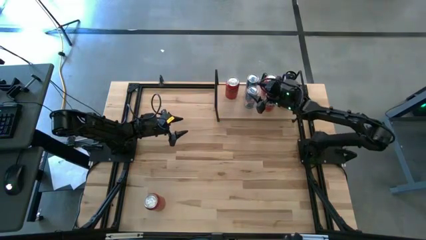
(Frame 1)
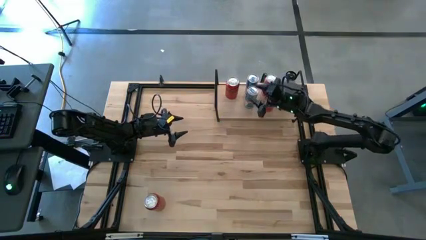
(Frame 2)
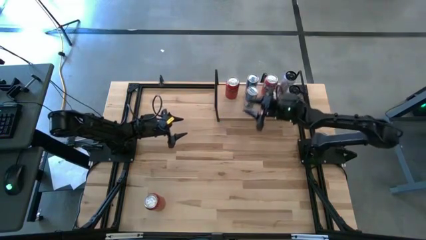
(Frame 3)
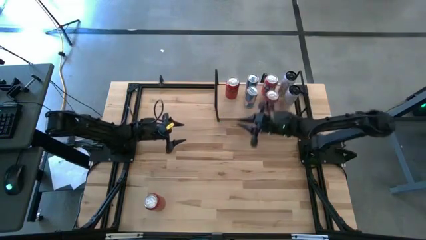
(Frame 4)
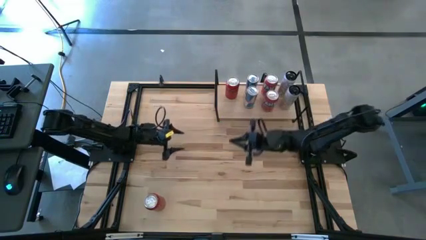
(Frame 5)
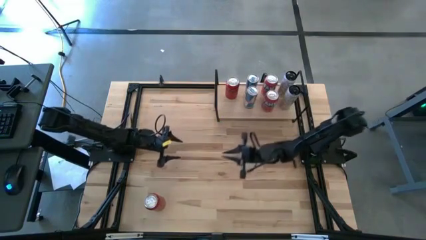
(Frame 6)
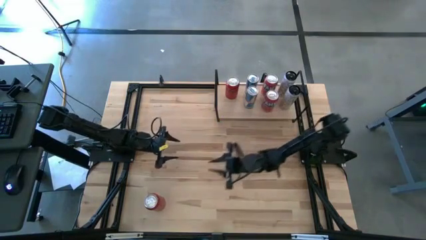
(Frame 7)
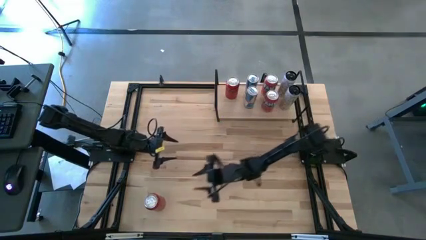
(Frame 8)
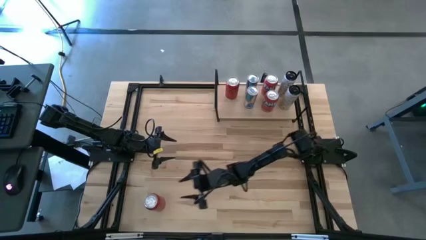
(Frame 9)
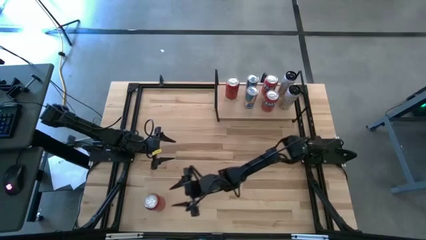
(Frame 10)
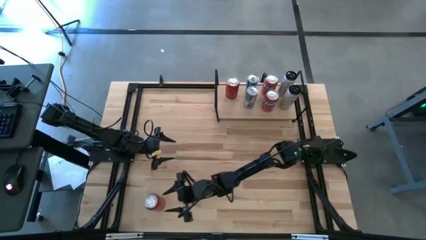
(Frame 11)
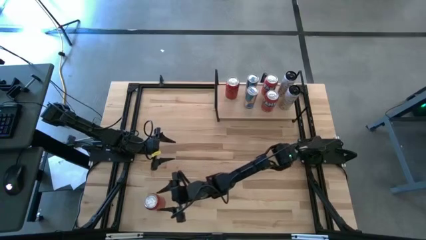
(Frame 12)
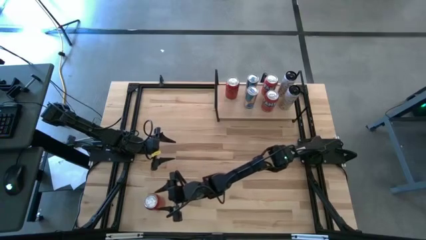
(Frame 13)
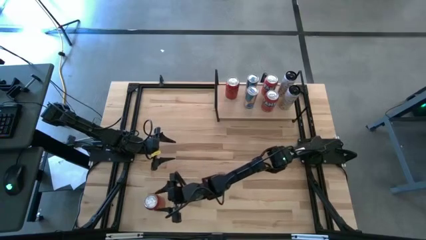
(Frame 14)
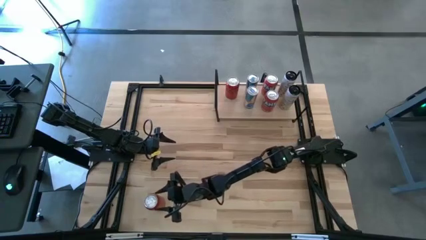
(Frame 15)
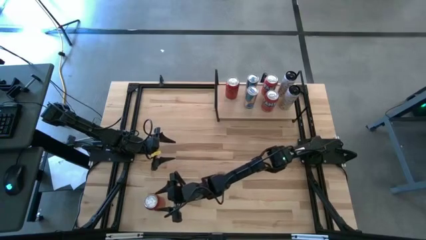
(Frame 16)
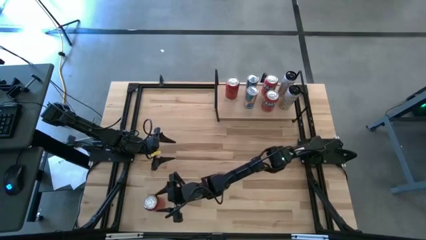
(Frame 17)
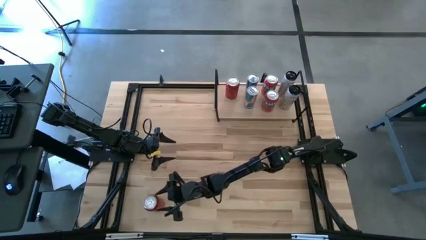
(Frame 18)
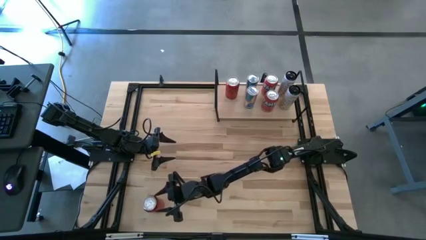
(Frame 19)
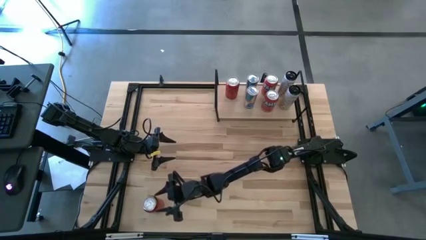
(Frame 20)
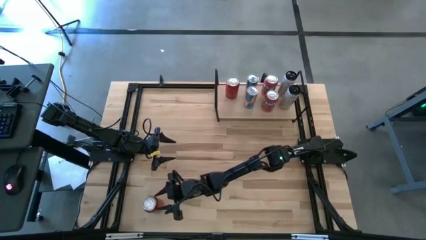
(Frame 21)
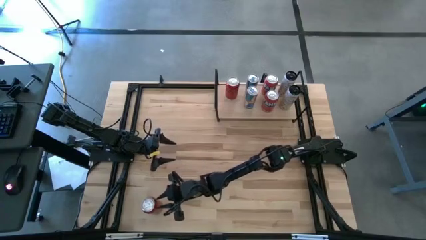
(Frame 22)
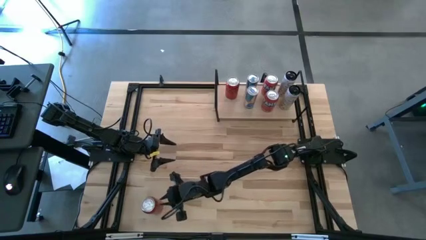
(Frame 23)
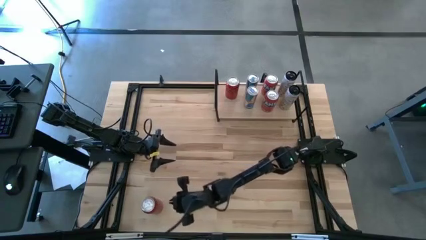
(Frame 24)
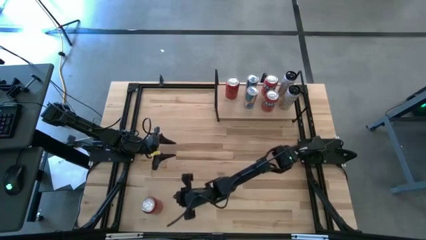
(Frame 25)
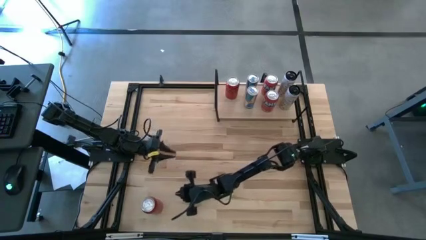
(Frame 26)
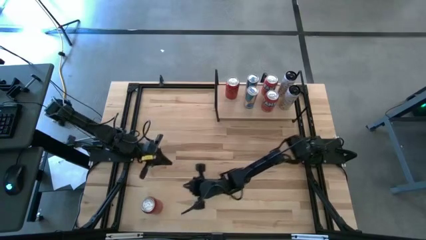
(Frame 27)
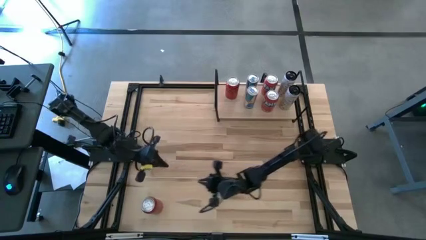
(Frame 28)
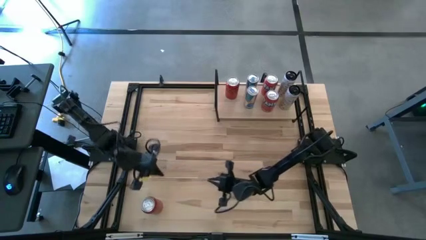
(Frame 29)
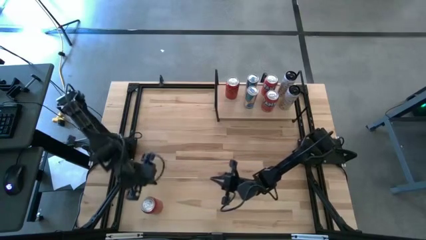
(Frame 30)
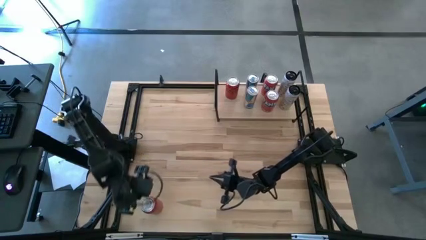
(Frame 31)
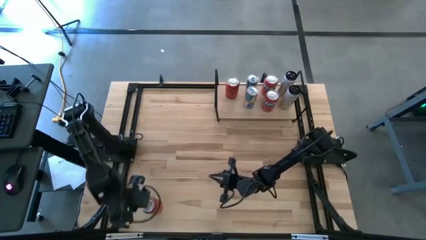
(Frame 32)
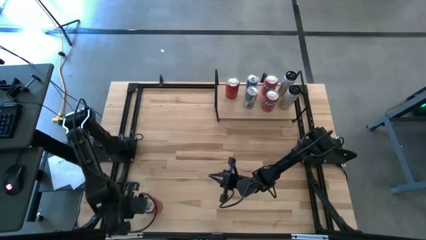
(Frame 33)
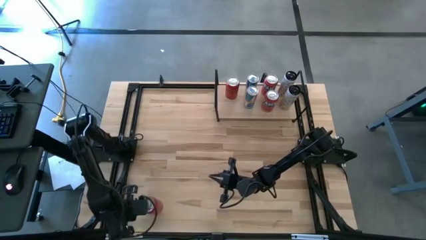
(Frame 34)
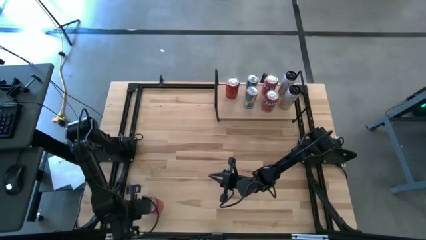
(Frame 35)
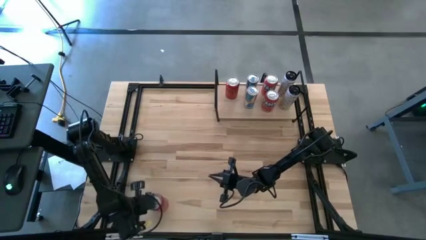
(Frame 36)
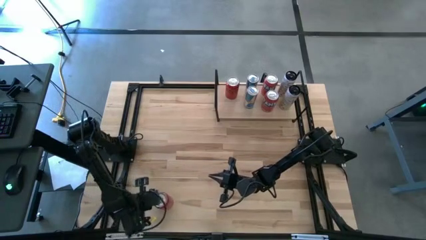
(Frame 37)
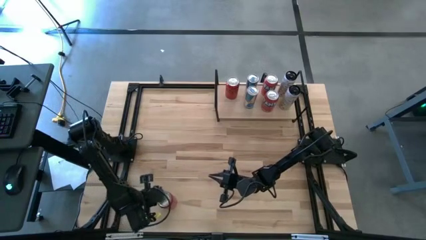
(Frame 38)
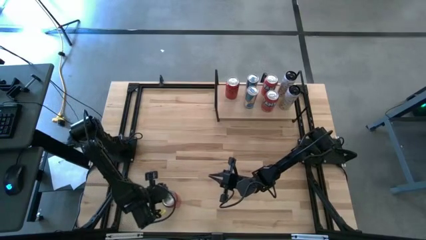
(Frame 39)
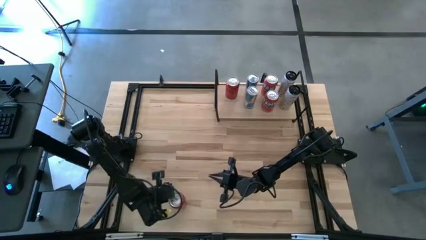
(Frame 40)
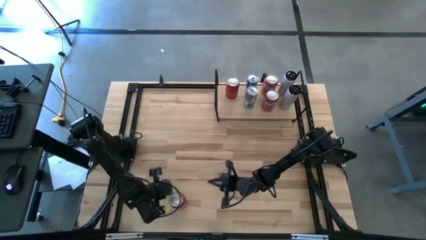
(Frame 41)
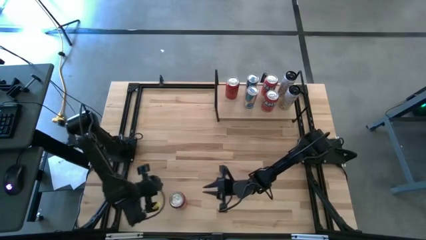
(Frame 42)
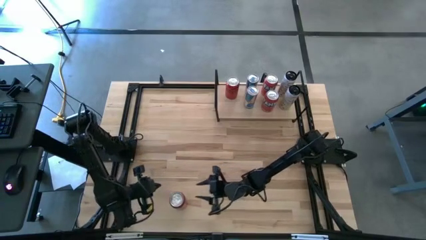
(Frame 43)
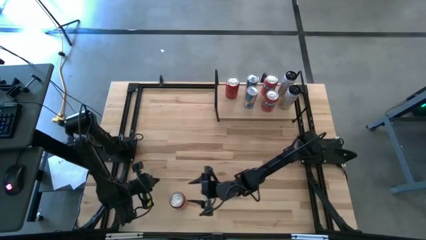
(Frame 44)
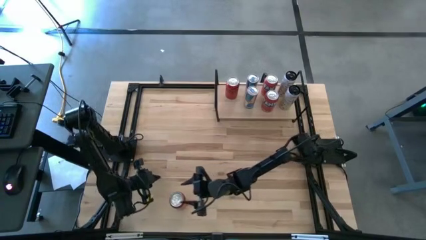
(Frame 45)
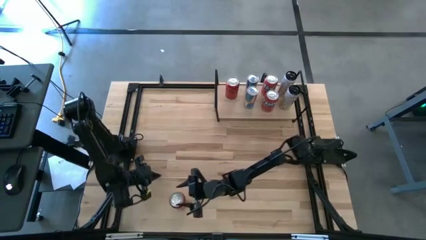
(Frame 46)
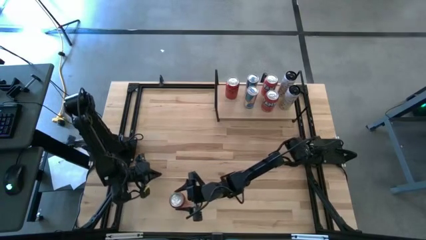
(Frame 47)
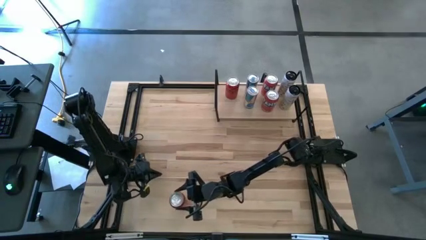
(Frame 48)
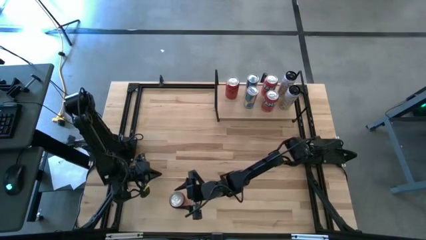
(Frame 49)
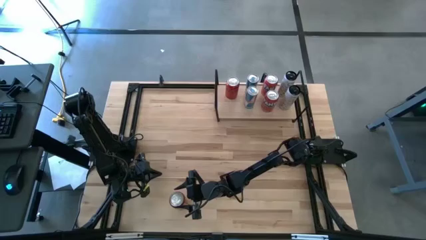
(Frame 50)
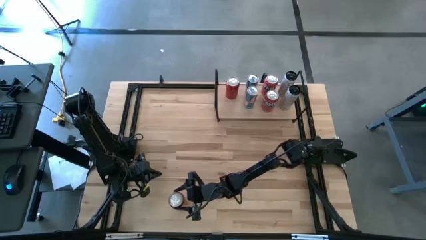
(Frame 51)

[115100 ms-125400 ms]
Task: Place canned beverage on shelf
Put the red-black soda can on the shelf aligned with the other red-black soda can
